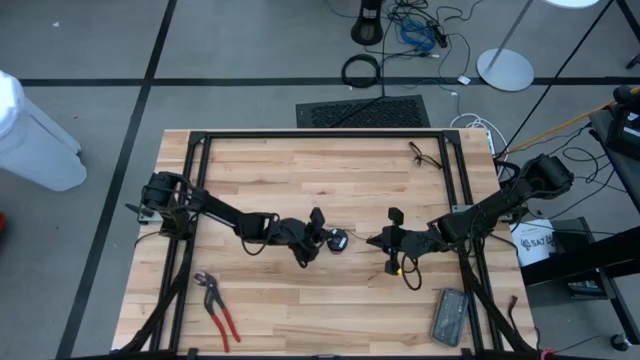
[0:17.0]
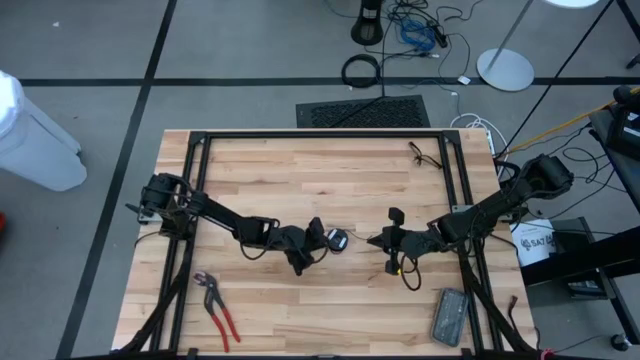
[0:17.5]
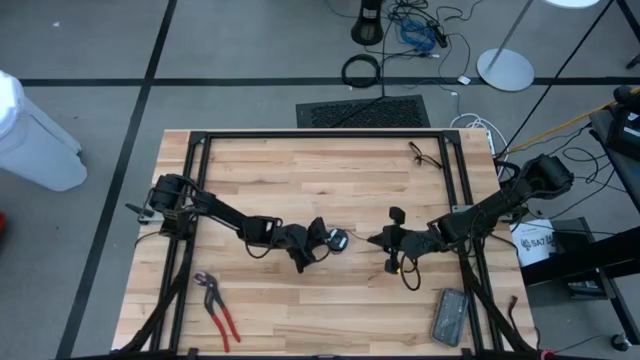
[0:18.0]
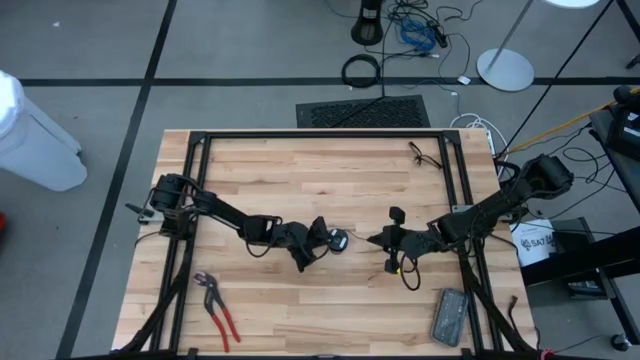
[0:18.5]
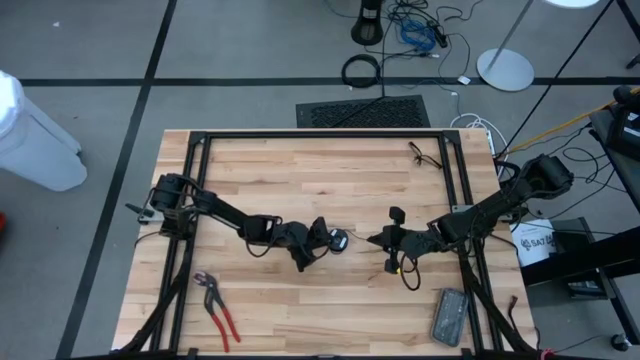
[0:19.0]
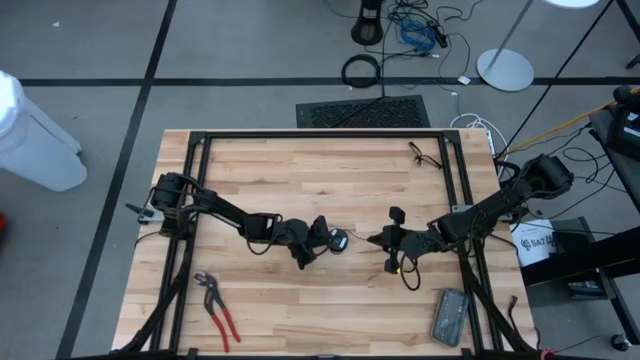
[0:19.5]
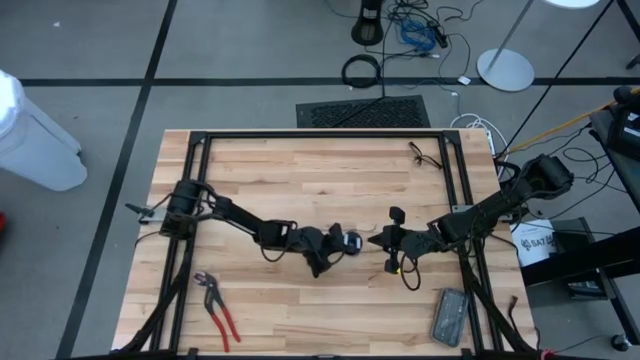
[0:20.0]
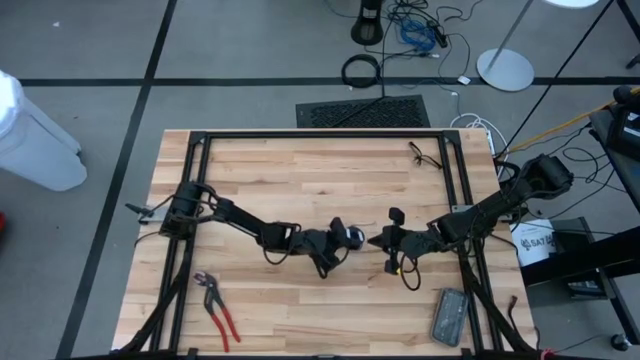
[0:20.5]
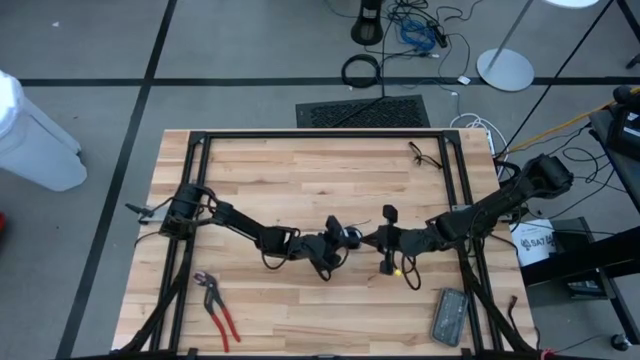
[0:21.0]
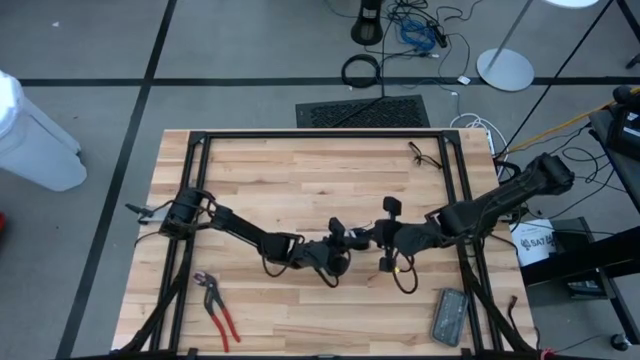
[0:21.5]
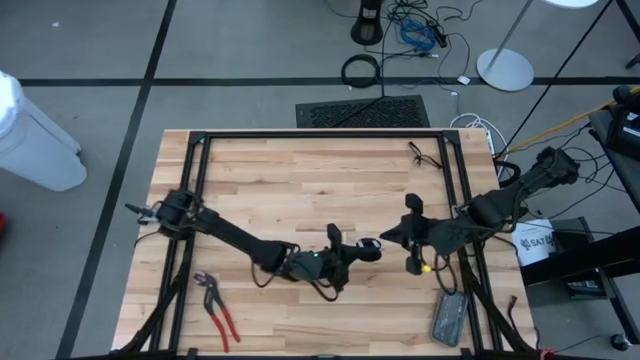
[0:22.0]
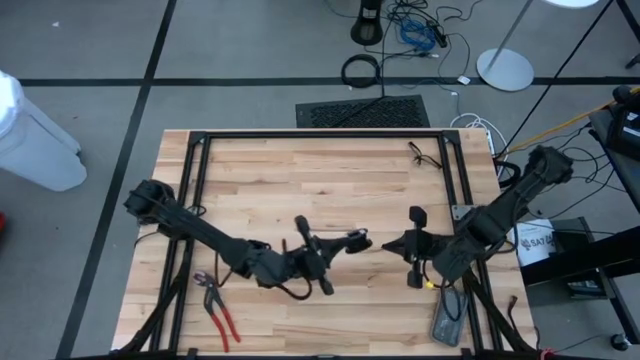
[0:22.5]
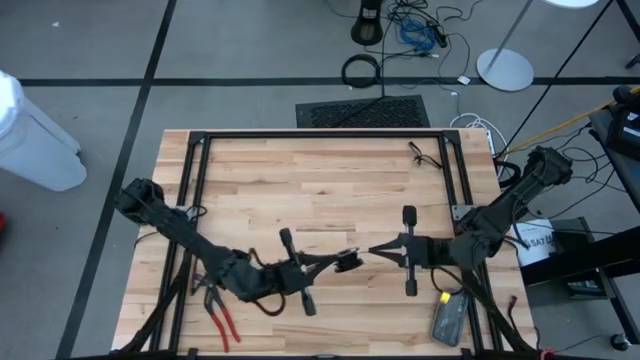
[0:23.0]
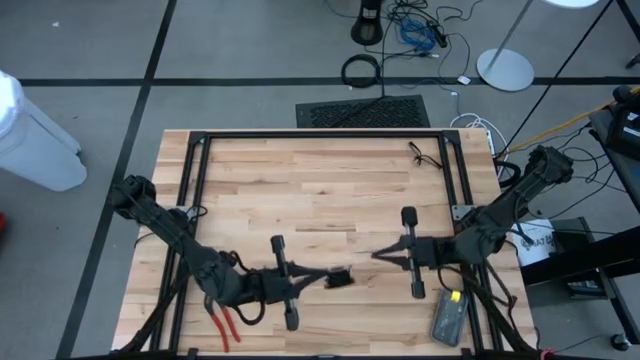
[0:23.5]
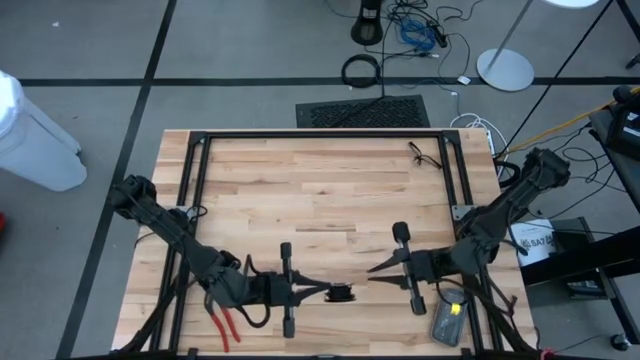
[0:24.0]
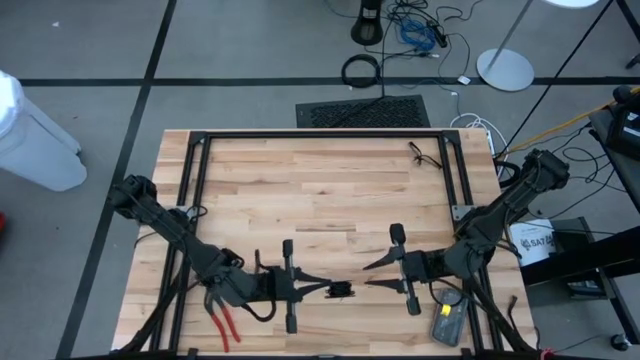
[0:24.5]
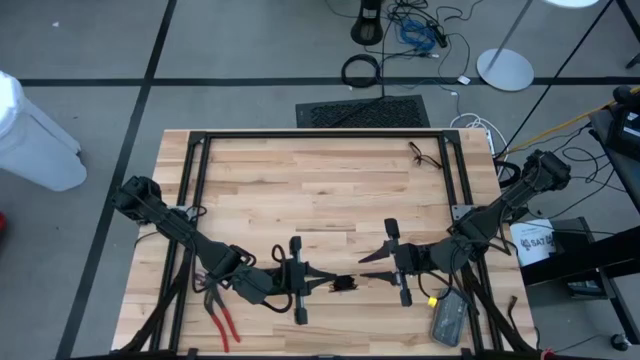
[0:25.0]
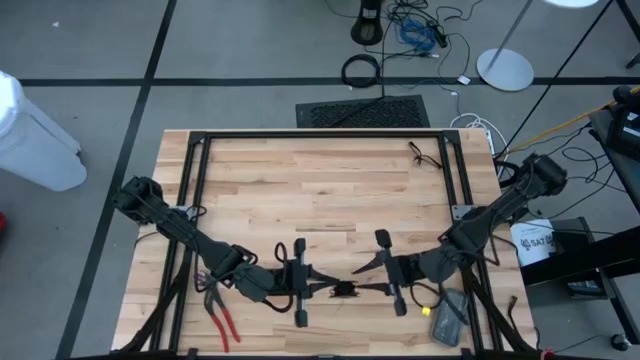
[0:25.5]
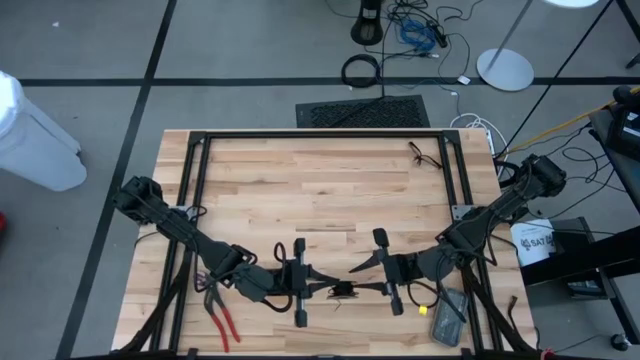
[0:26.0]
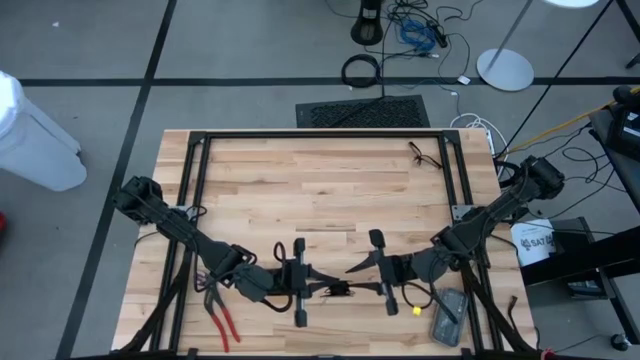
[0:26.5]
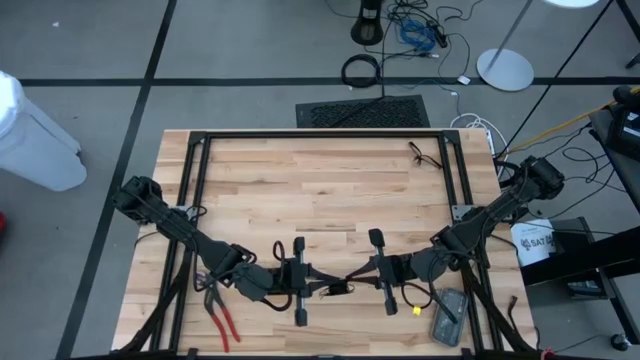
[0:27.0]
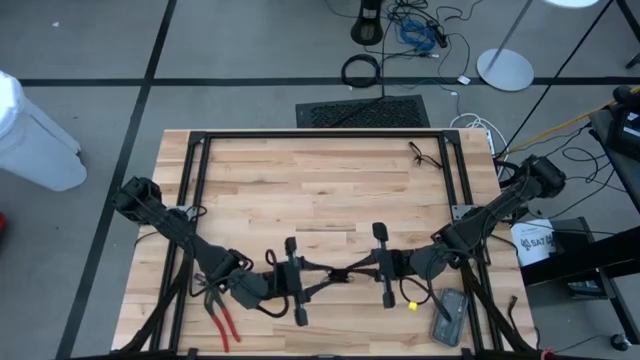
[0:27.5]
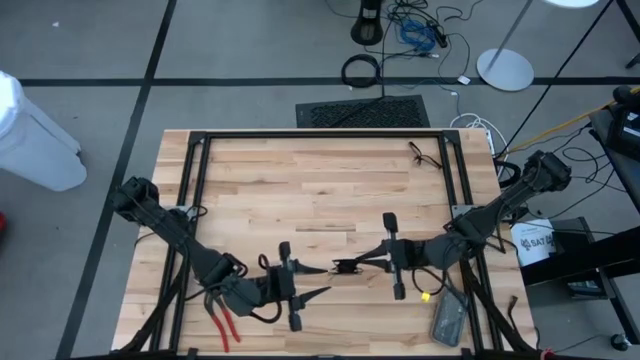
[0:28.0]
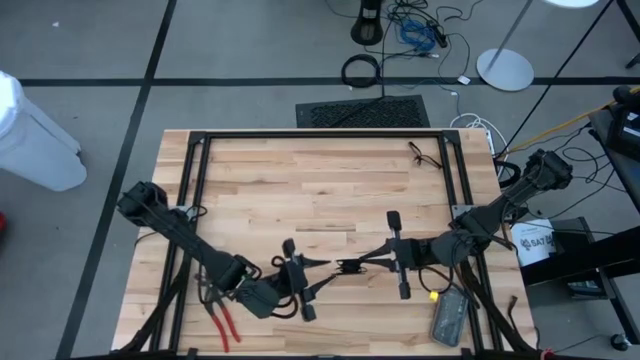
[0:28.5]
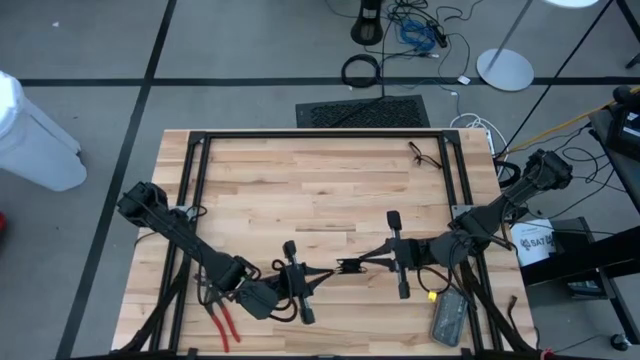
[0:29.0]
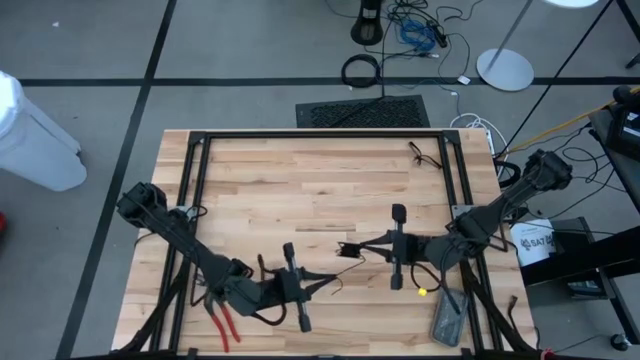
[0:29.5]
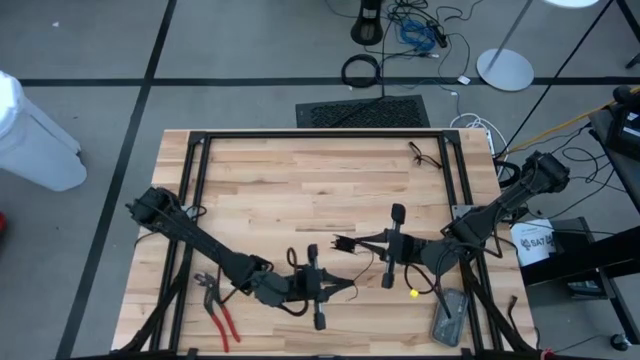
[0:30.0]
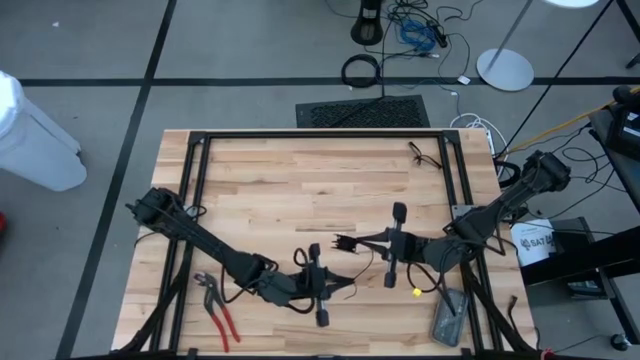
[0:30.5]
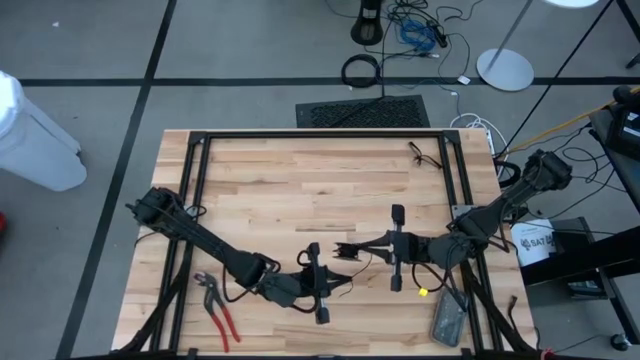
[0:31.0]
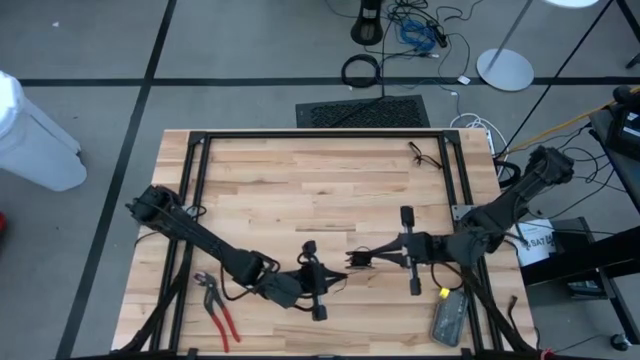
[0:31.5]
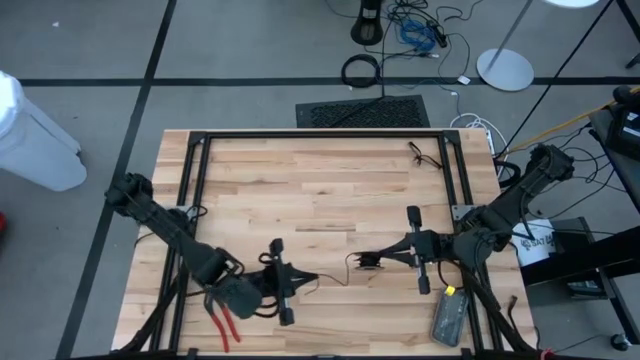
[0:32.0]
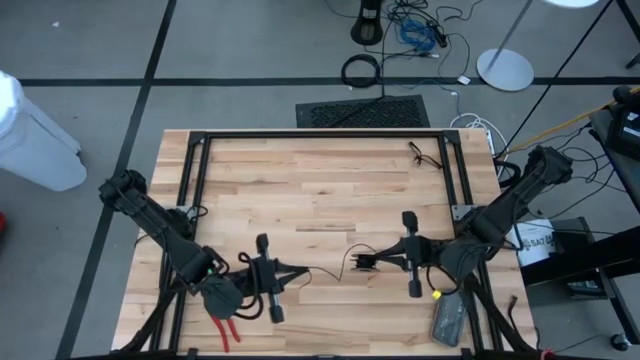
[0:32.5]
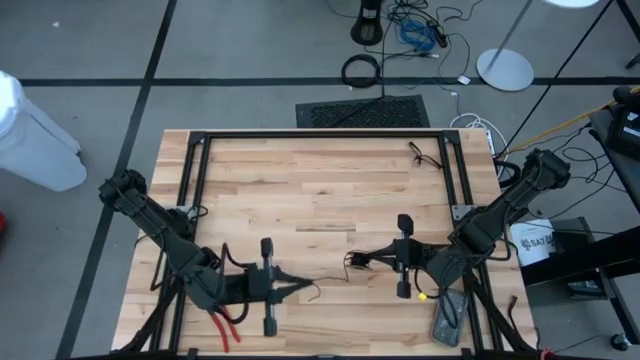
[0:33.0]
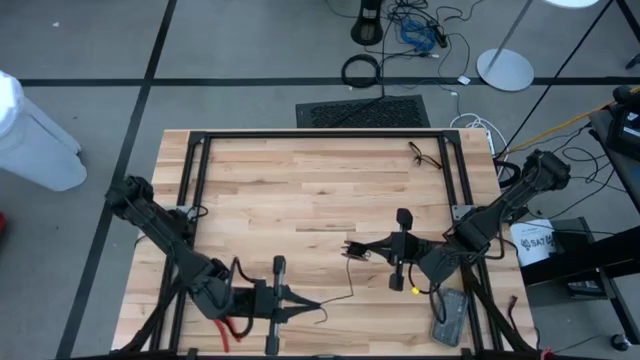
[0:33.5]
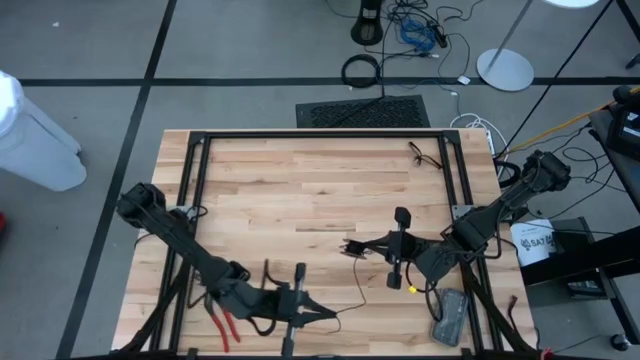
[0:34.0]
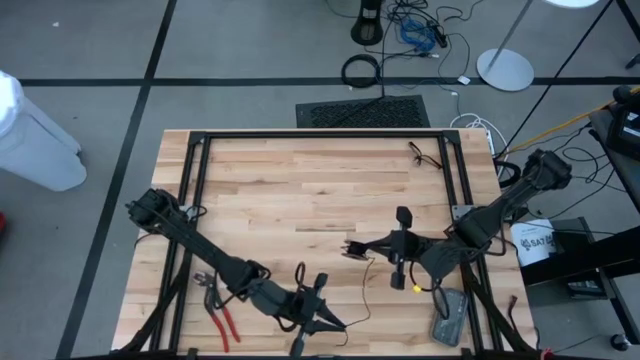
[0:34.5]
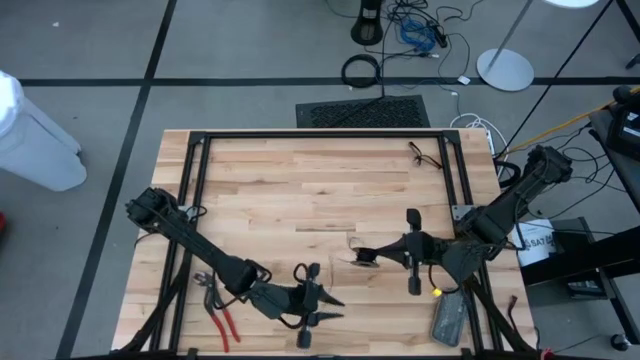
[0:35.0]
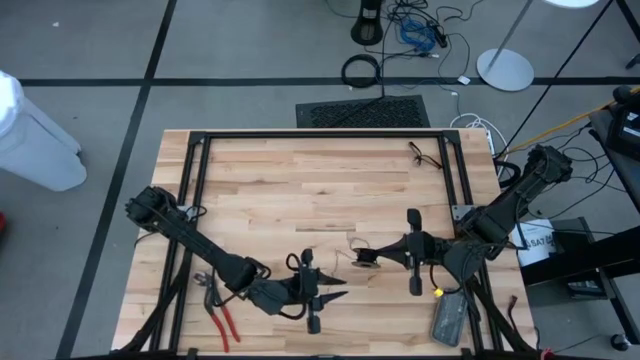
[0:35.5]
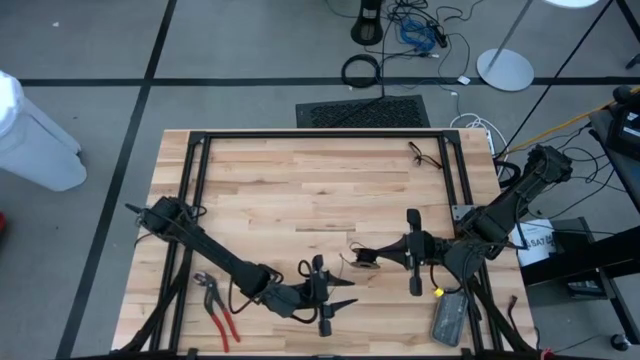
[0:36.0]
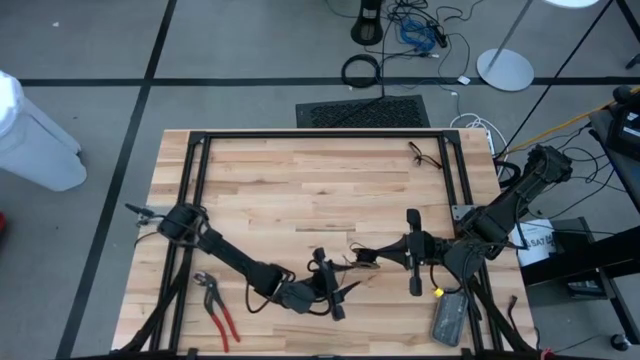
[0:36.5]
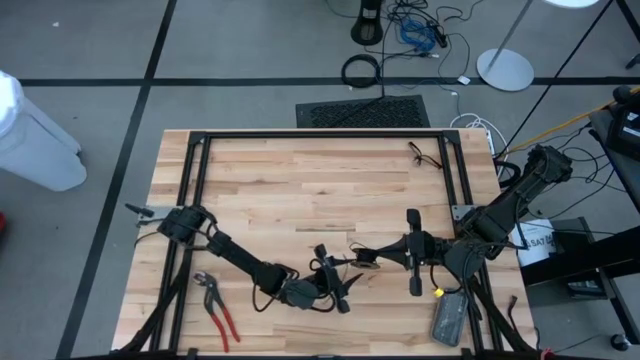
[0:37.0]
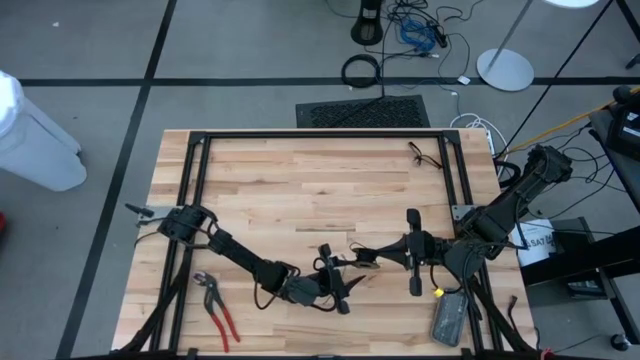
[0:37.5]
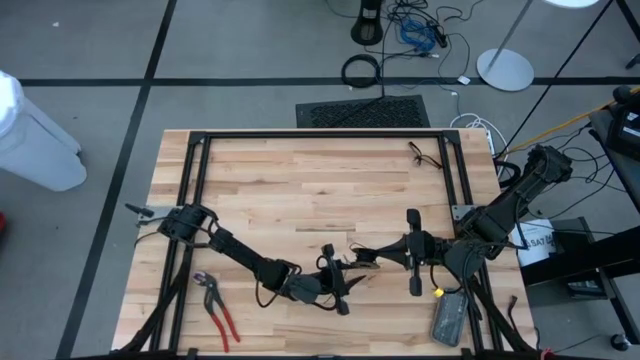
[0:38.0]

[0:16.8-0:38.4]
Task: Coil cords
Uncoil the black wire from the black spool
